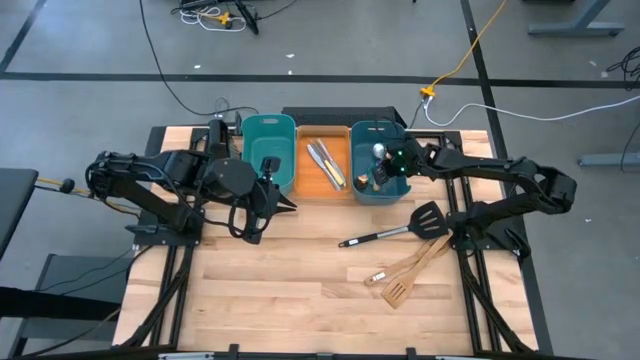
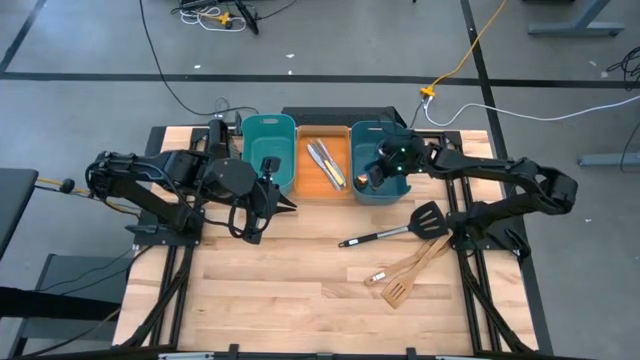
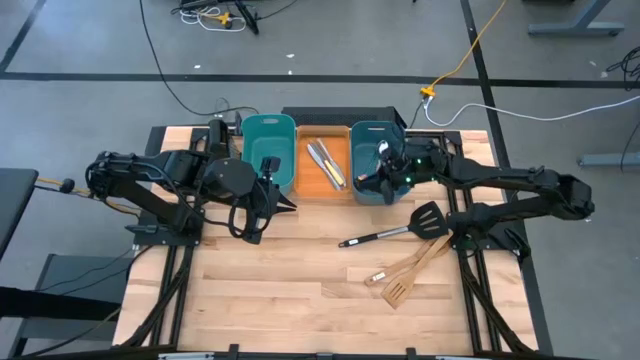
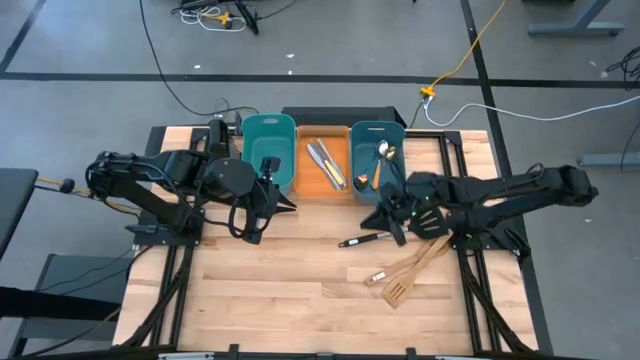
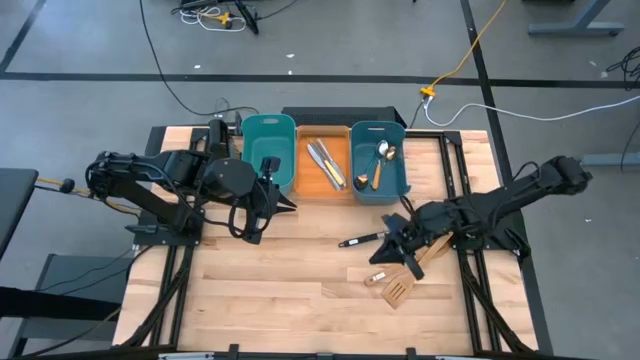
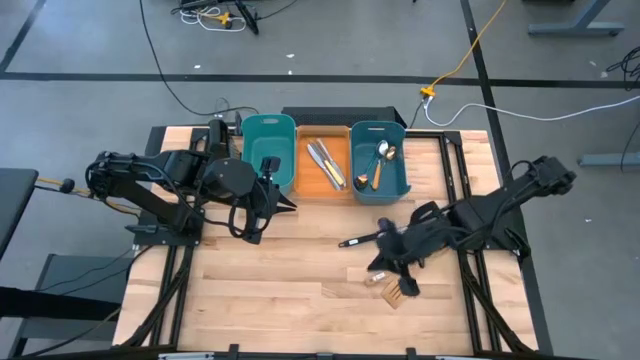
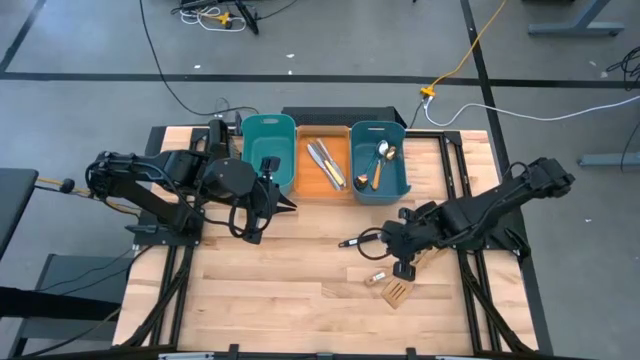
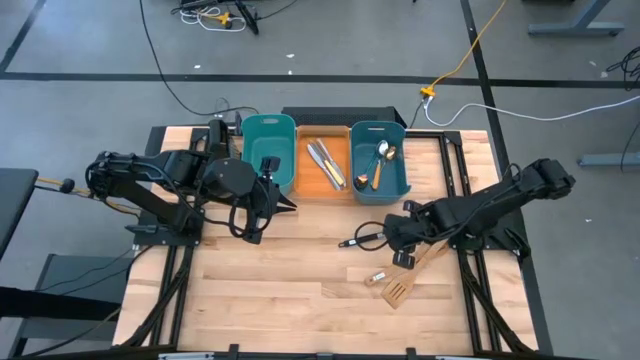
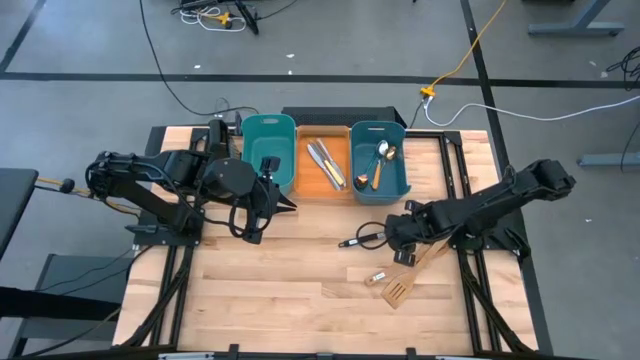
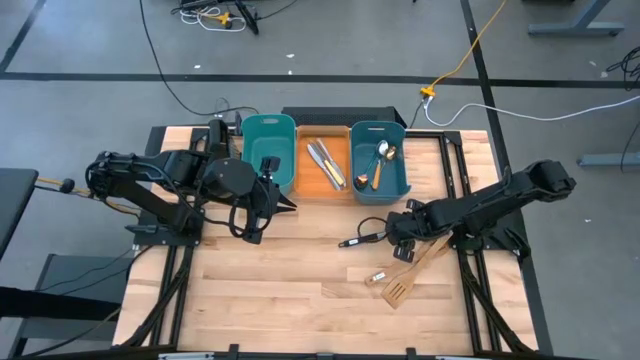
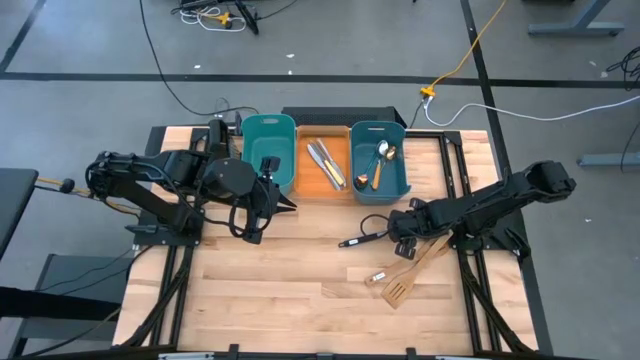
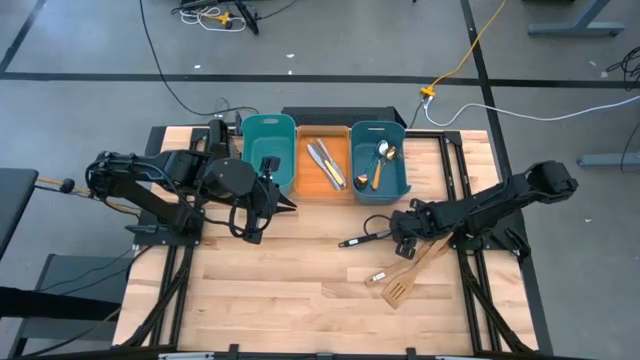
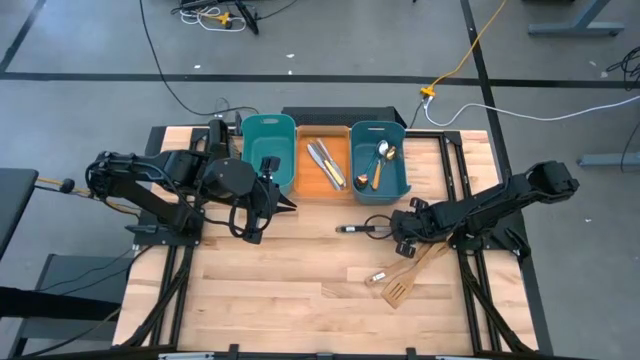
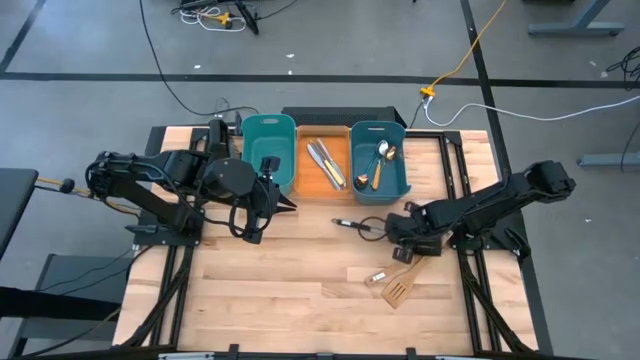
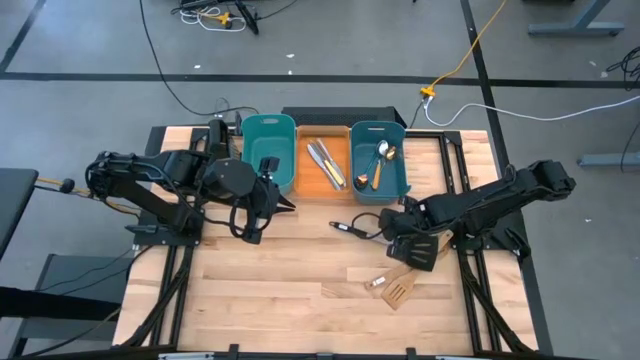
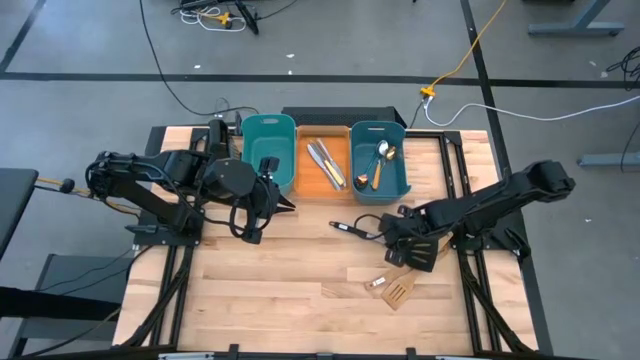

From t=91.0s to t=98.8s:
Task: Pick & Place Kitchen Items
Put the black spatula into the light blue bin

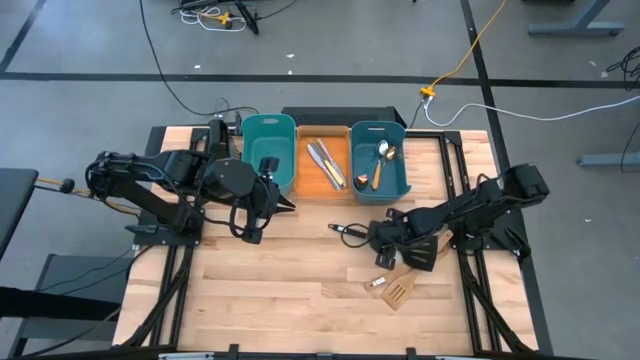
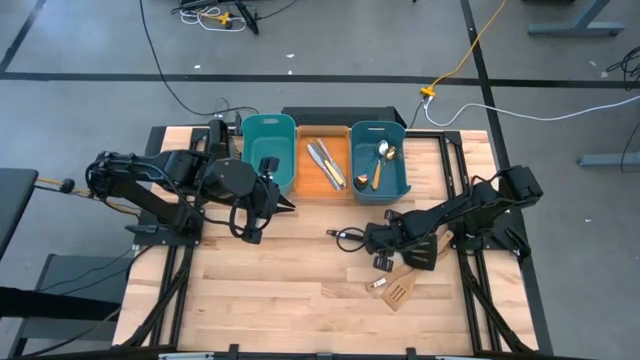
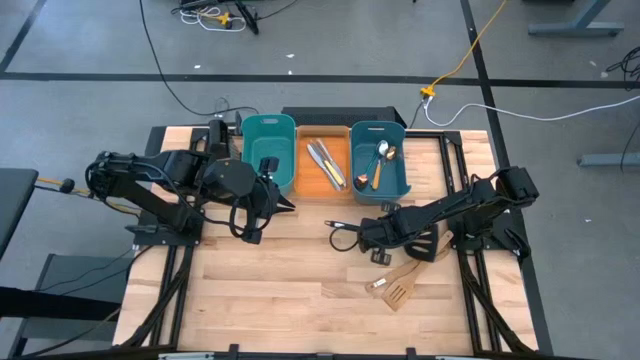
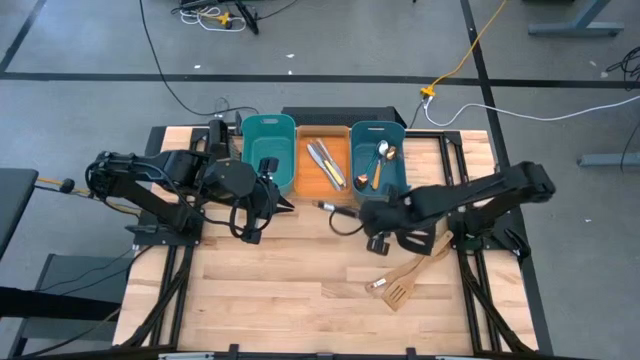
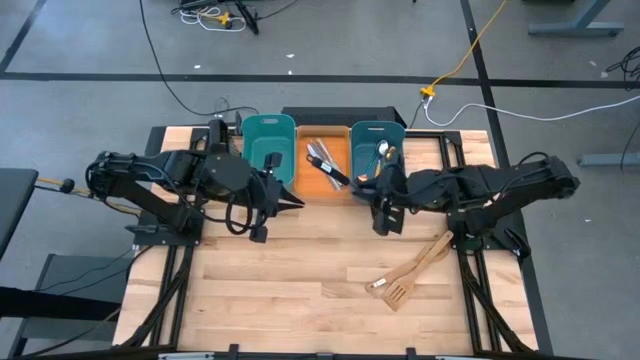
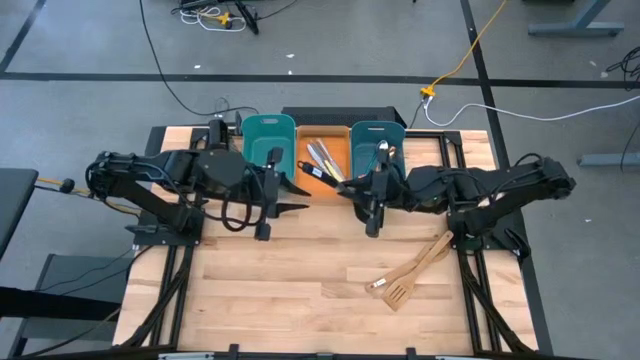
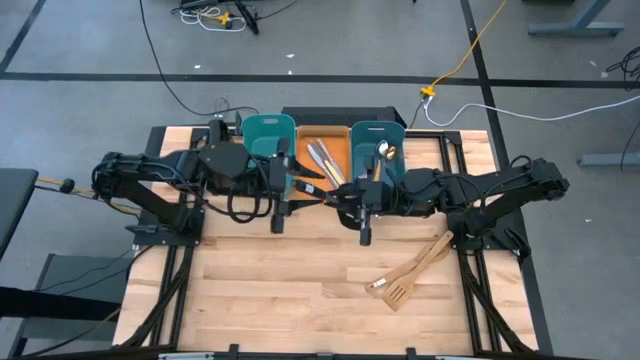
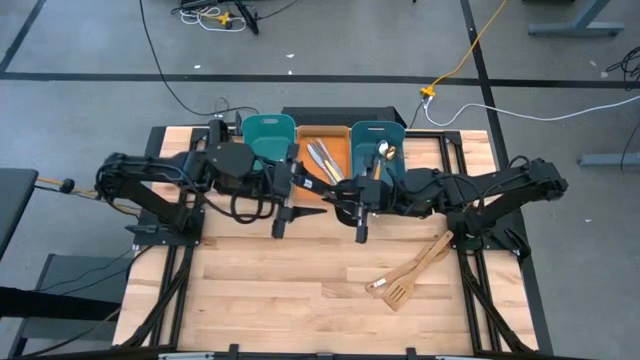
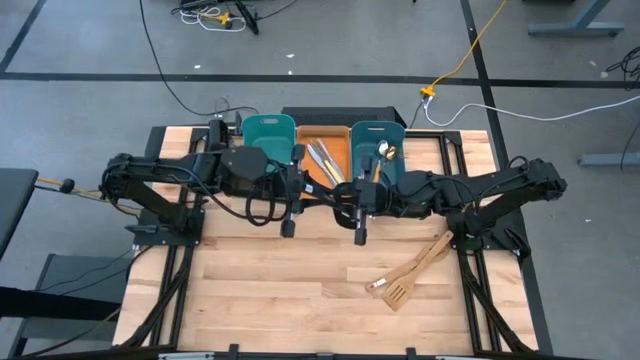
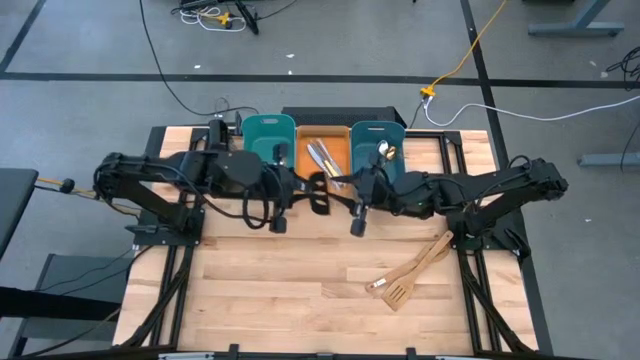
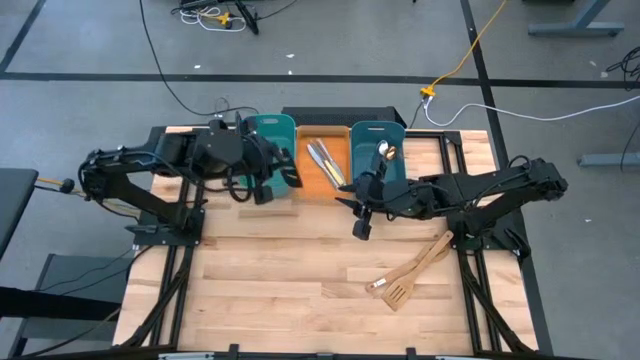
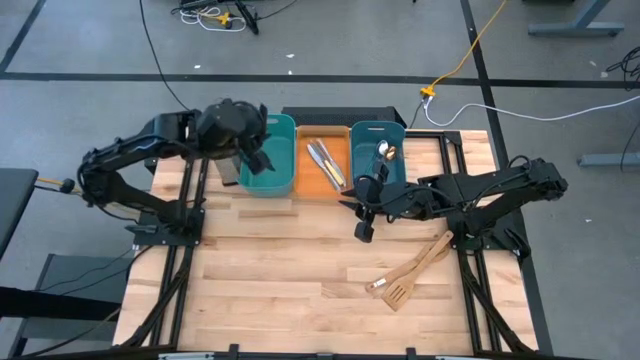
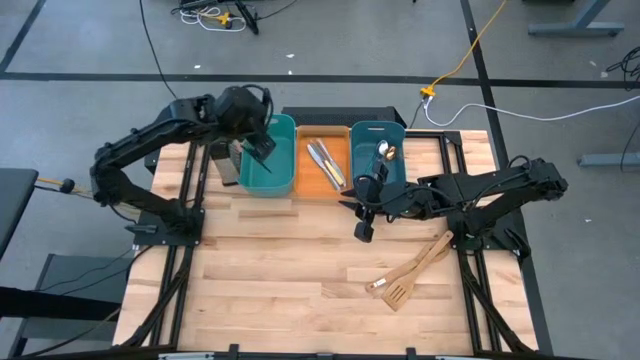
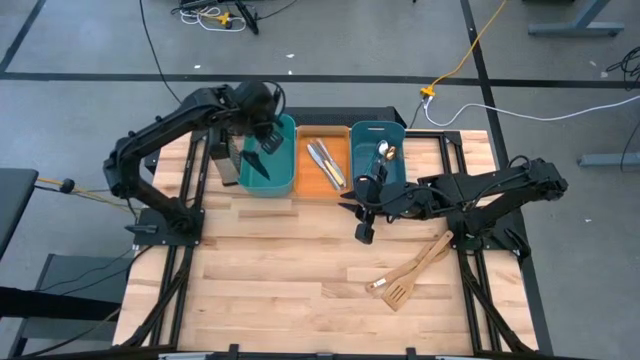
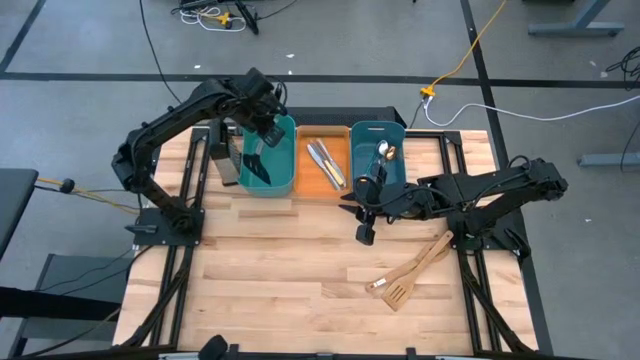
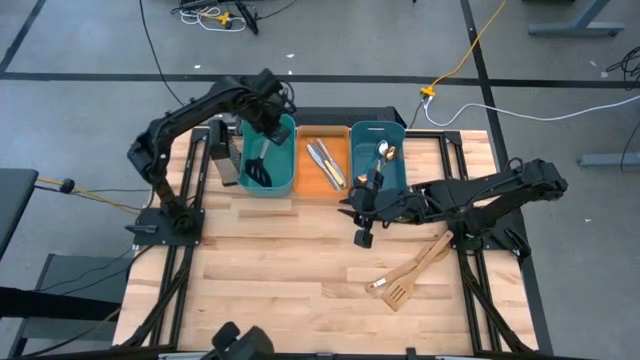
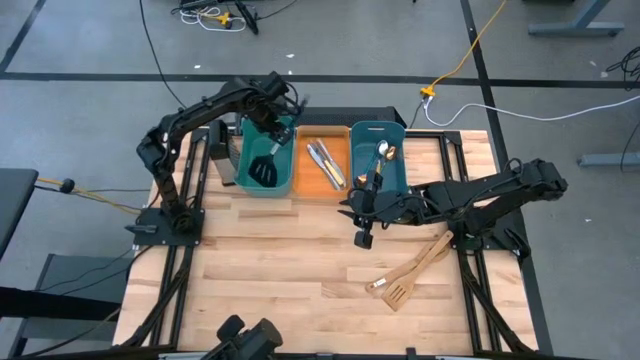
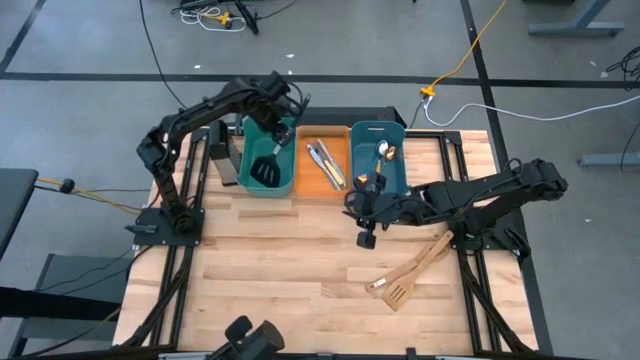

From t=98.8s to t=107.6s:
Put the black spatula into the green bin

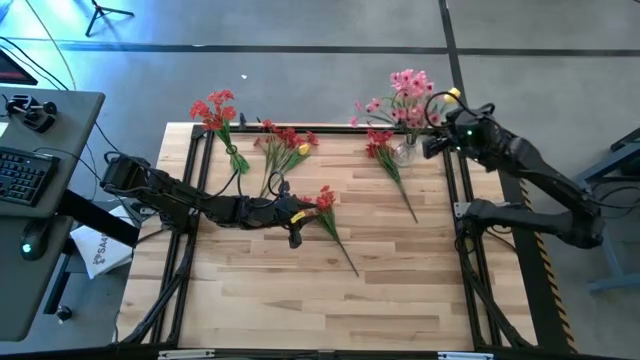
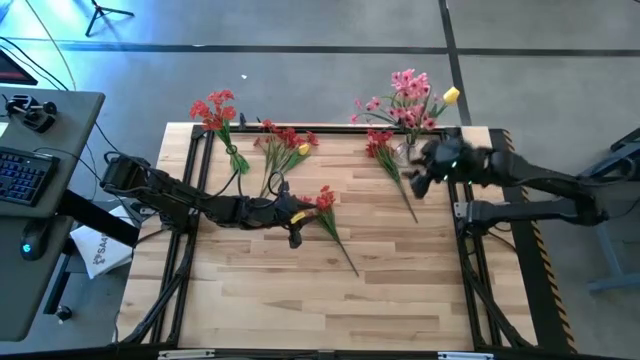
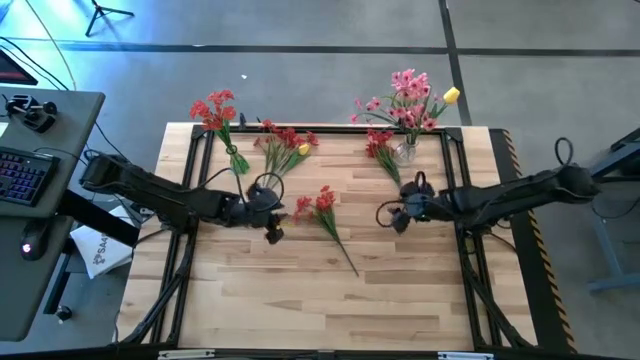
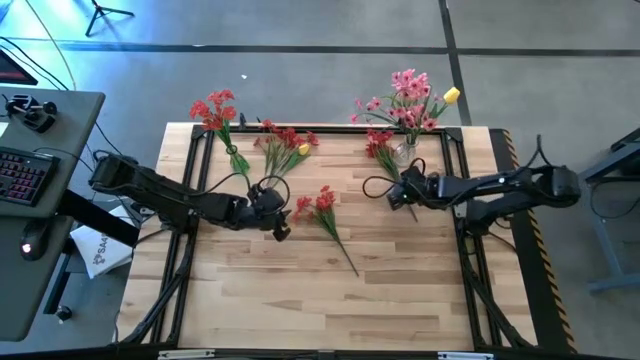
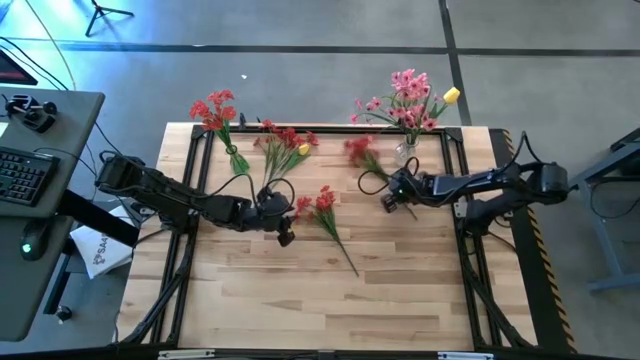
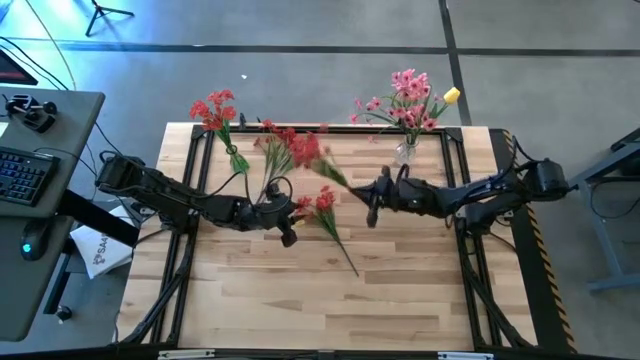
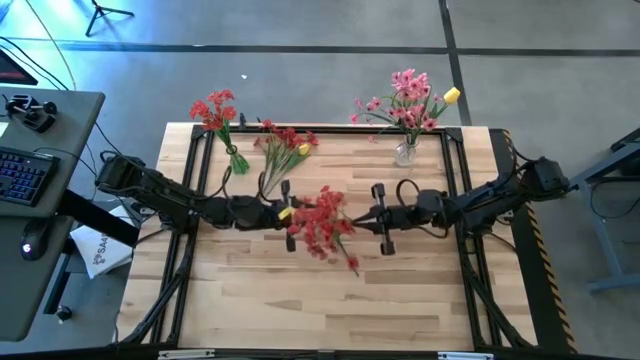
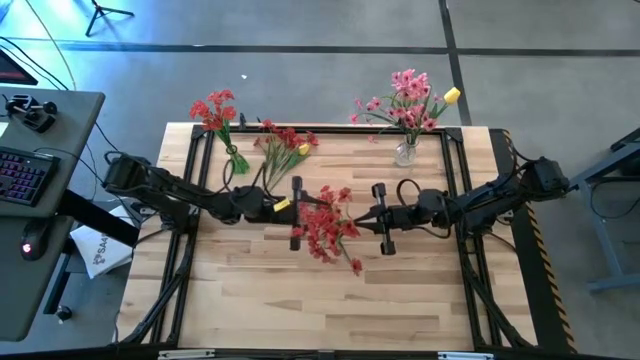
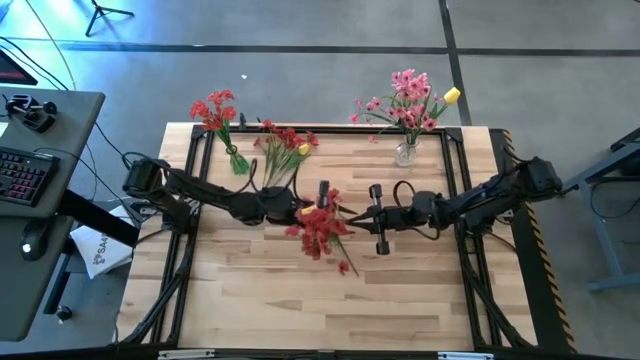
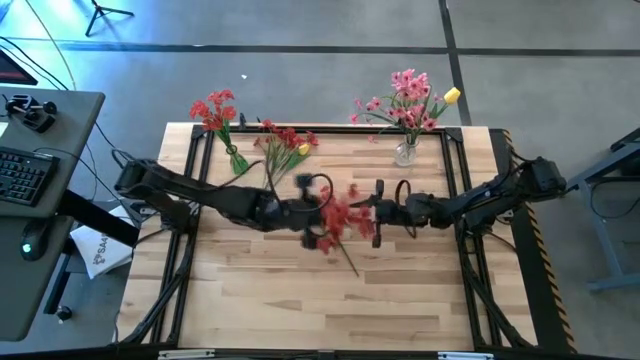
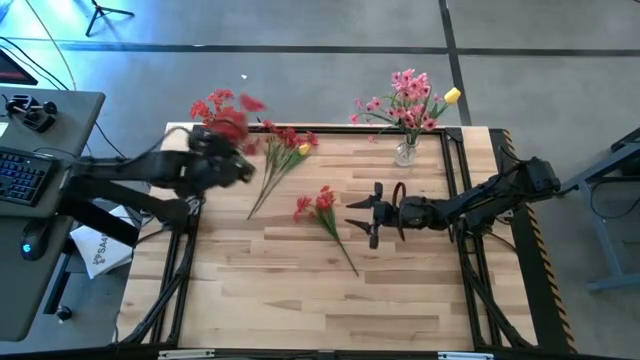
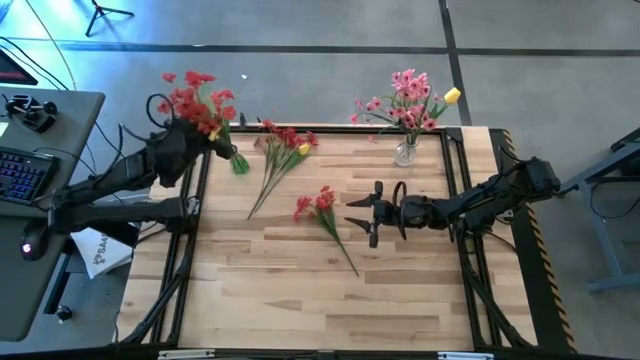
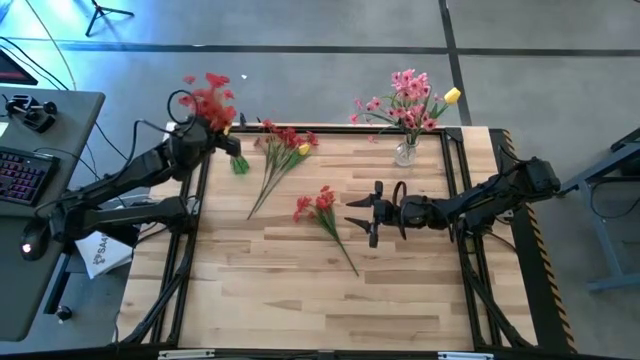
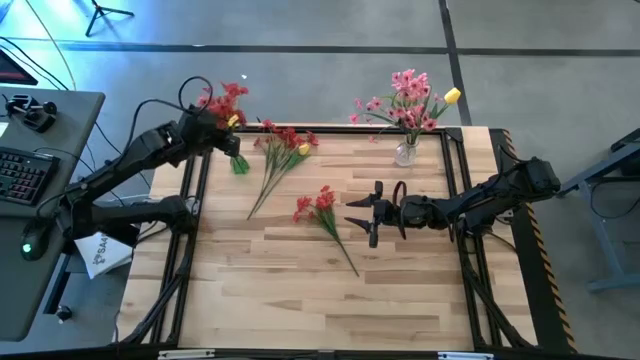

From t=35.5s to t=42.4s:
Task: Sort flowers into vase by color
Put the top right red flowers into the green vase
